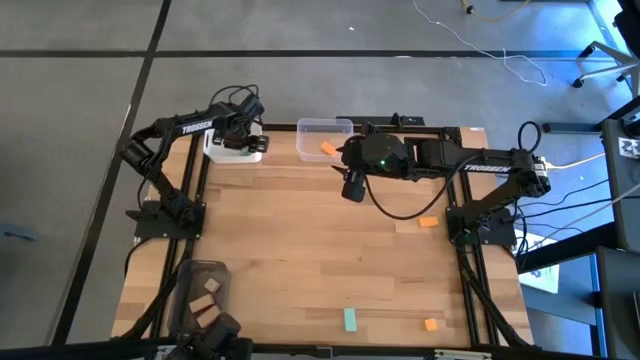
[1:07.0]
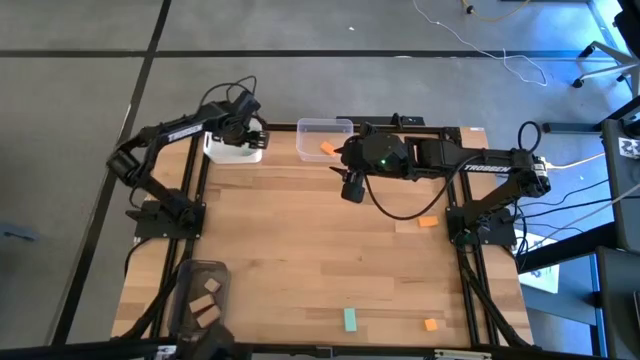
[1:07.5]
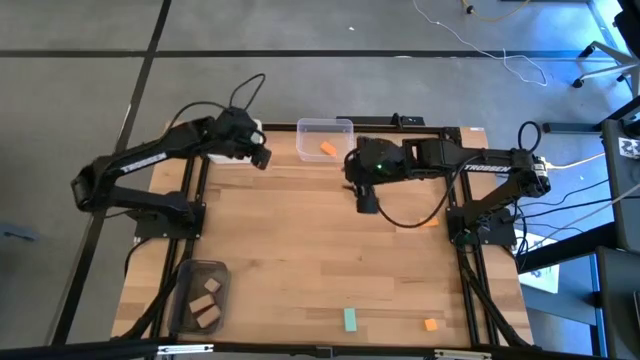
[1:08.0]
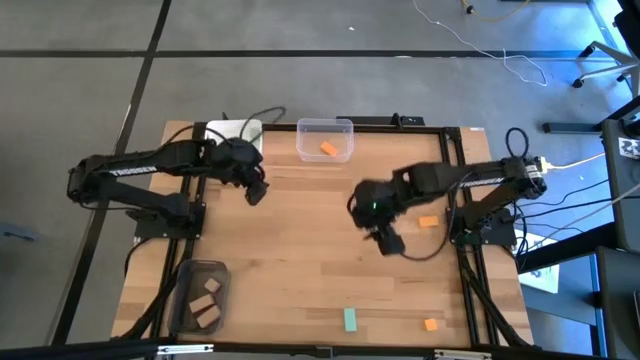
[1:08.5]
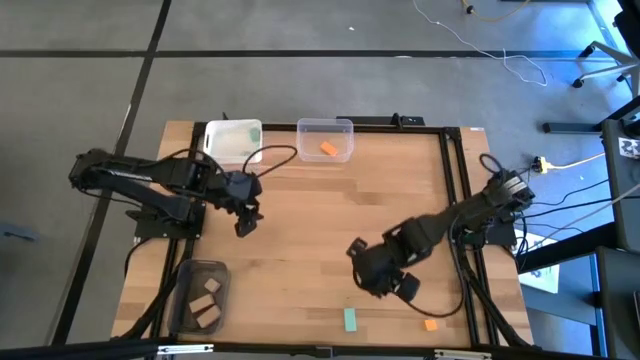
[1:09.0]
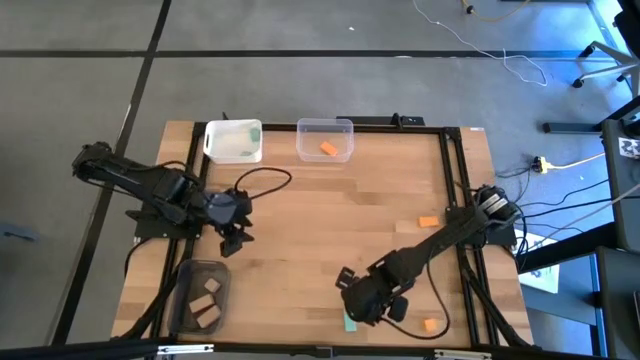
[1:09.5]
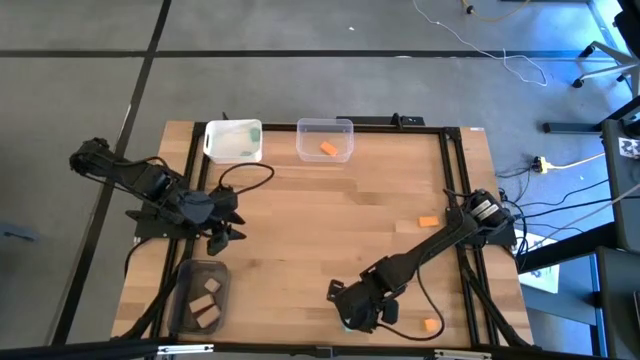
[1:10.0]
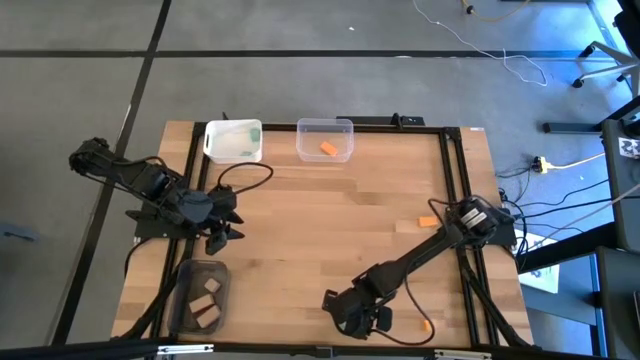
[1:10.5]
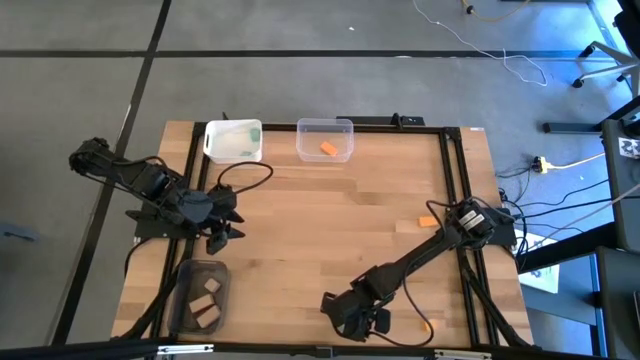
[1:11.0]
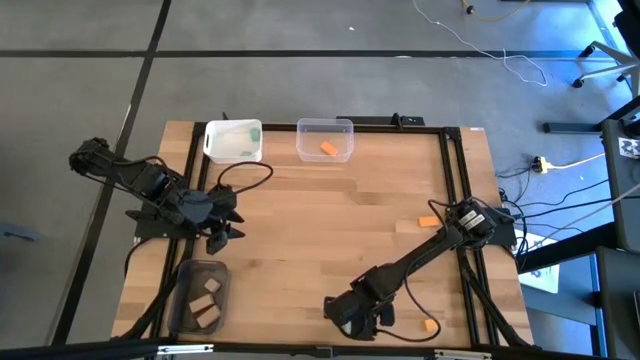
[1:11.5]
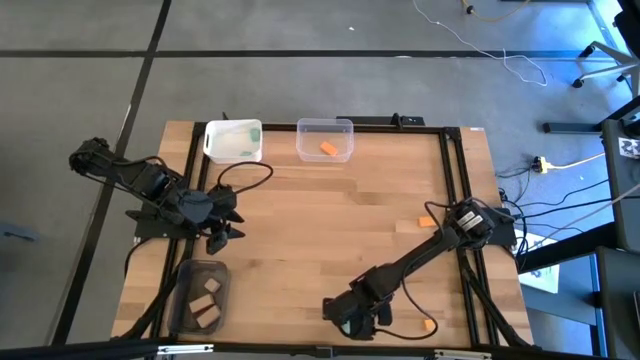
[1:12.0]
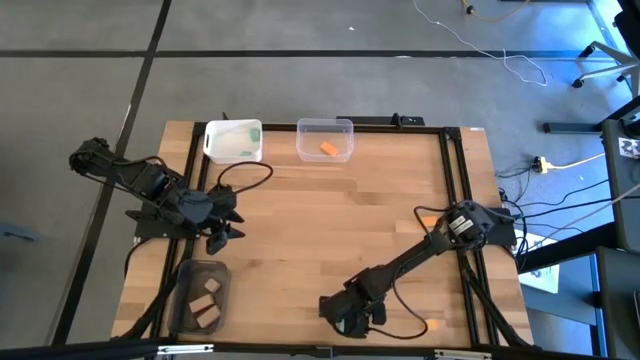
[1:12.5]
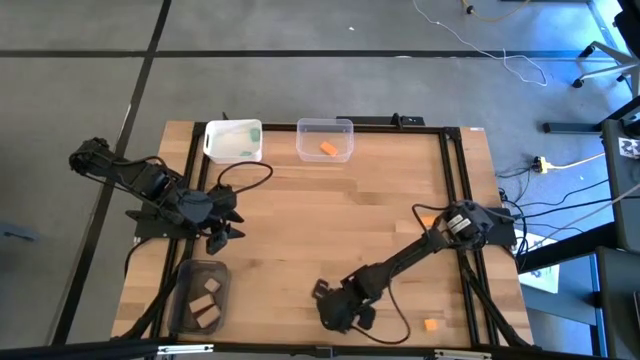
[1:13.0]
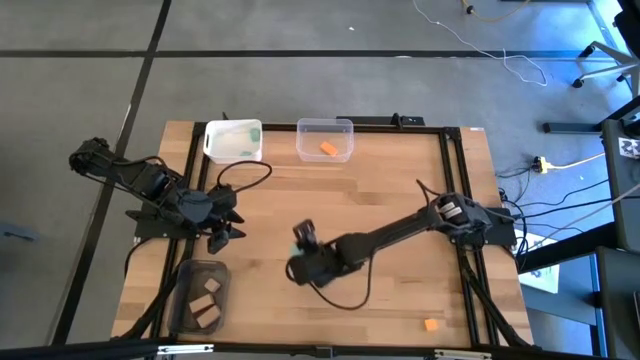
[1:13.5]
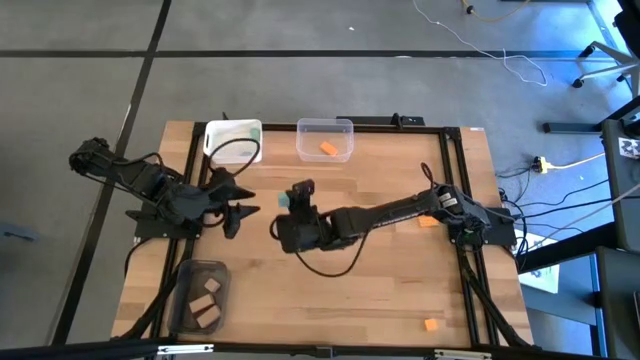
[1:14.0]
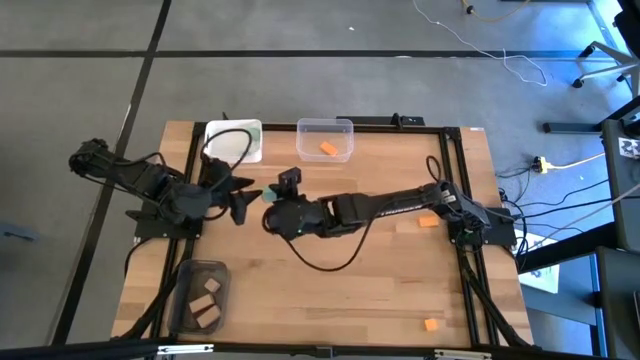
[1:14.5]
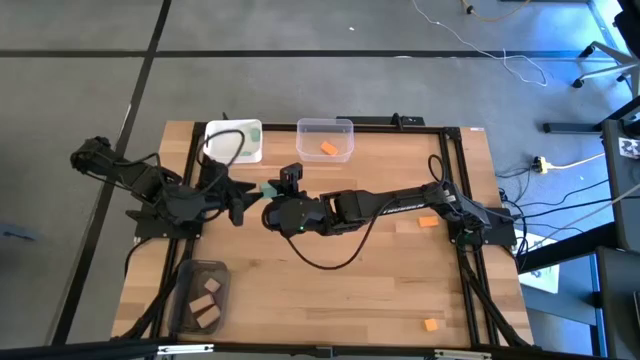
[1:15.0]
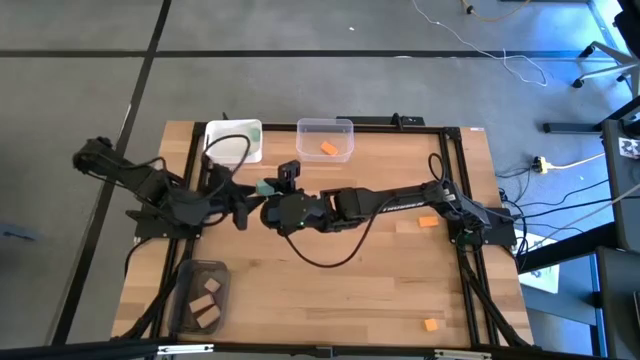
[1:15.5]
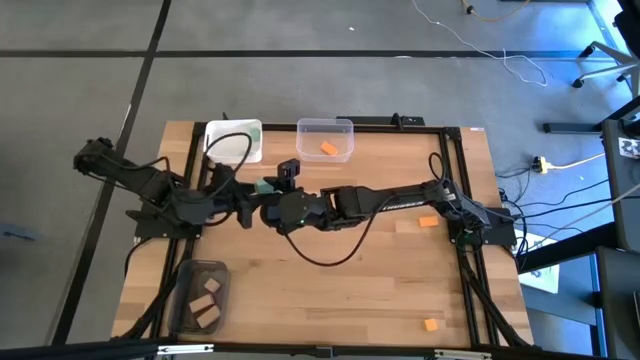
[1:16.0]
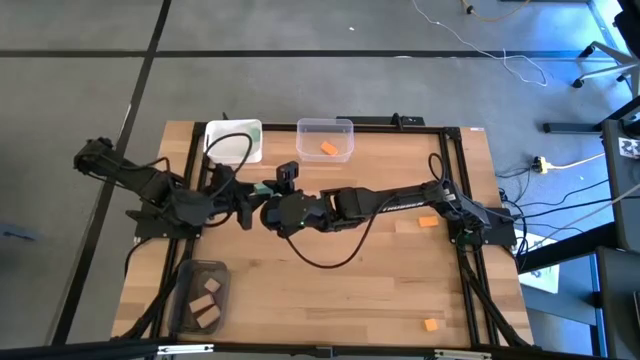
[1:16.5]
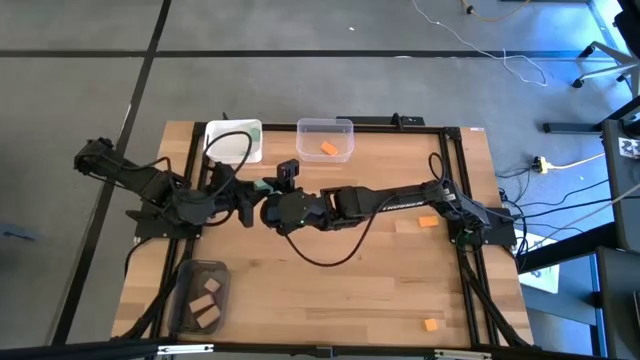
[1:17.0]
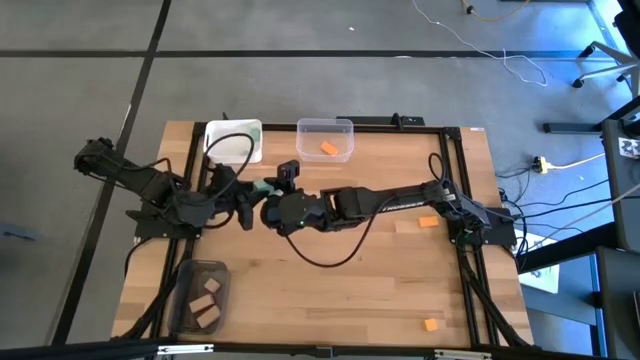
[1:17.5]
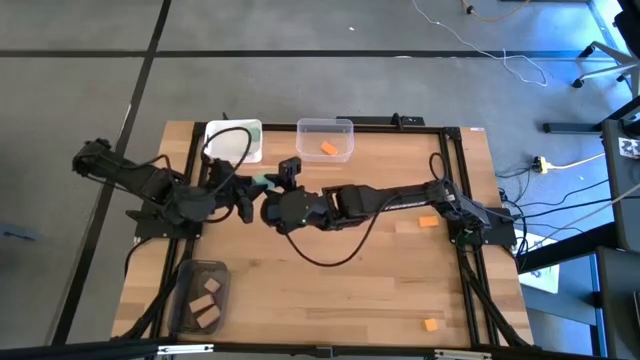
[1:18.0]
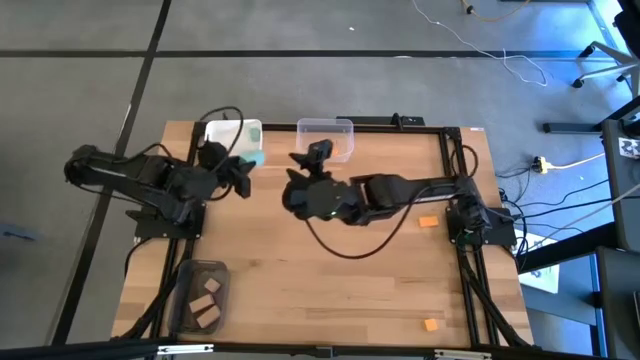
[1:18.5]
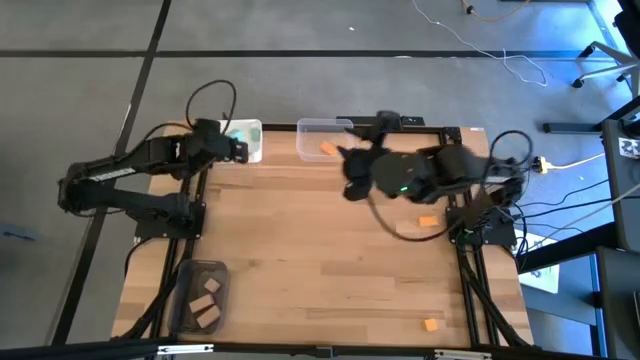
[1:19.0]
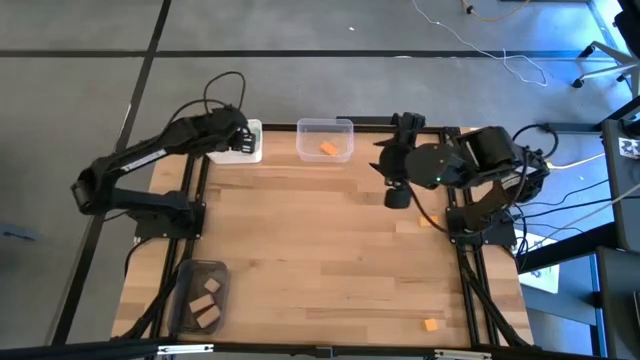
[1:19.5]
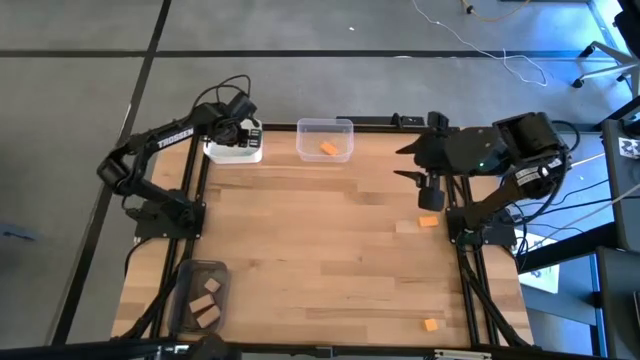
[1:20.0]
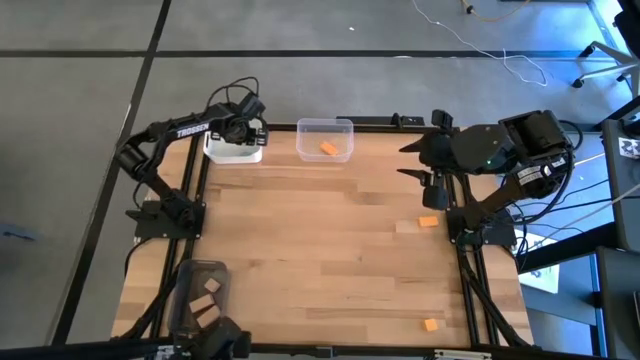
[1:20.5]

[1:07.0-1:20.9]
Task: Sort & place blocks by color
Put the blue block into the white bin

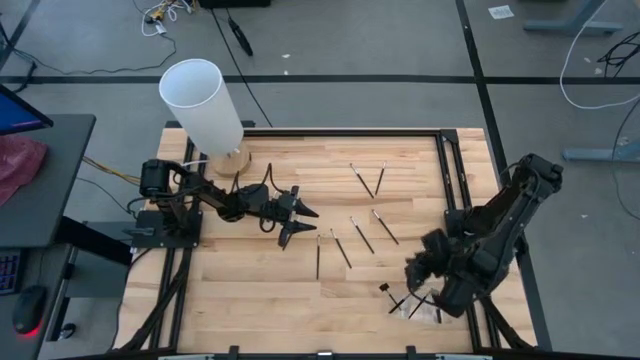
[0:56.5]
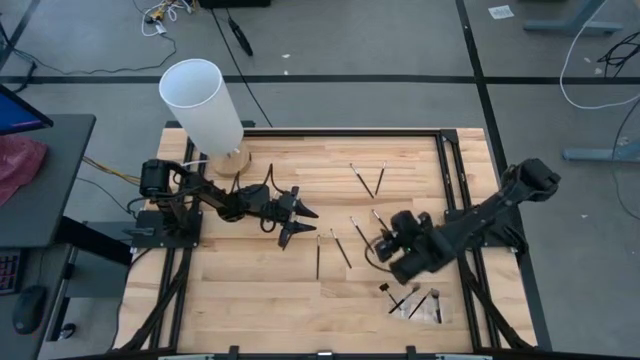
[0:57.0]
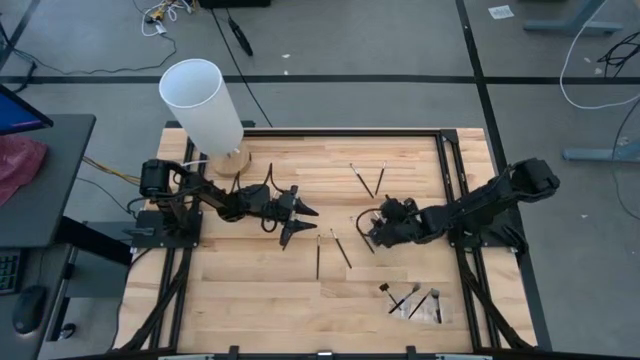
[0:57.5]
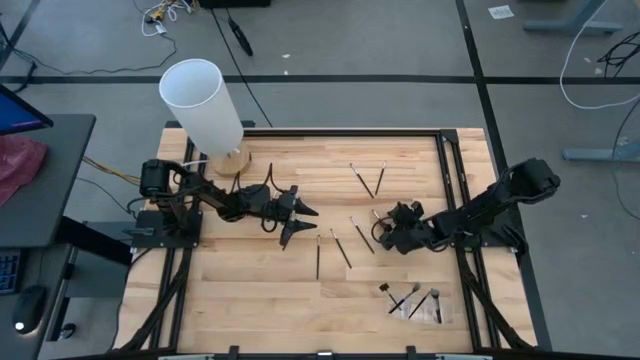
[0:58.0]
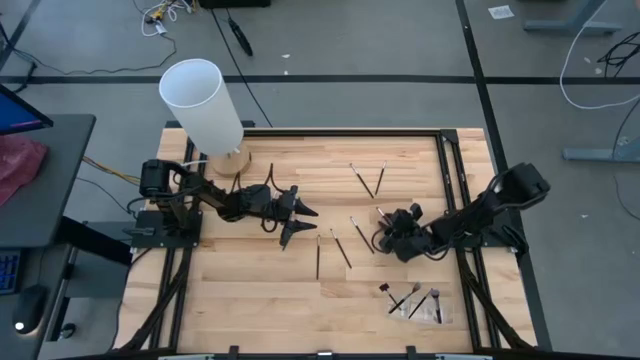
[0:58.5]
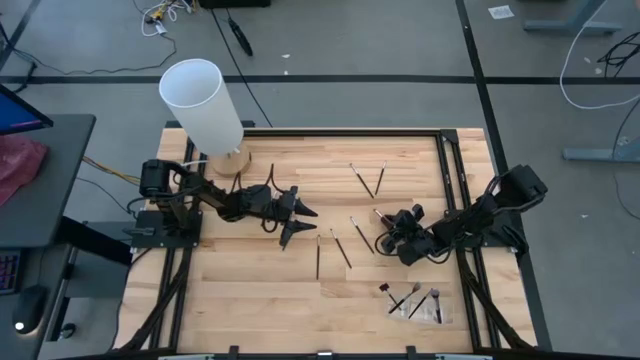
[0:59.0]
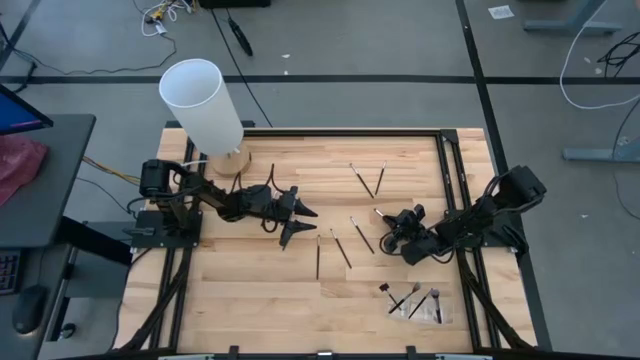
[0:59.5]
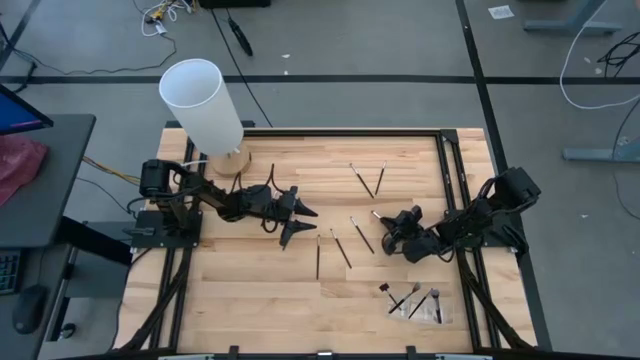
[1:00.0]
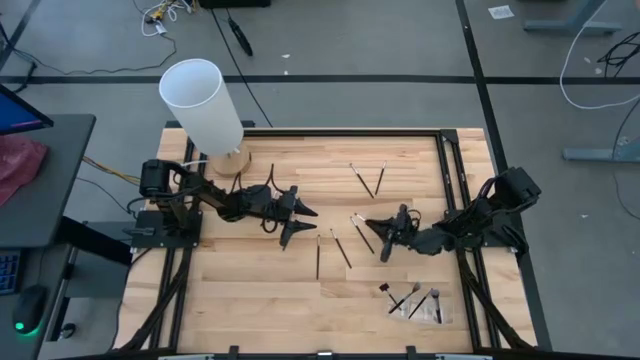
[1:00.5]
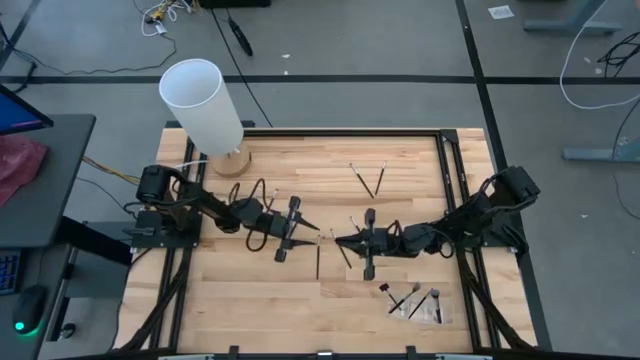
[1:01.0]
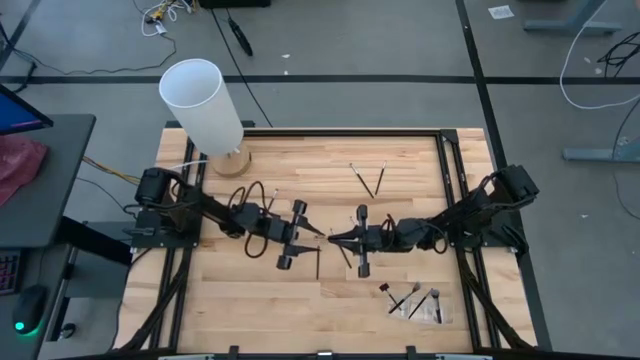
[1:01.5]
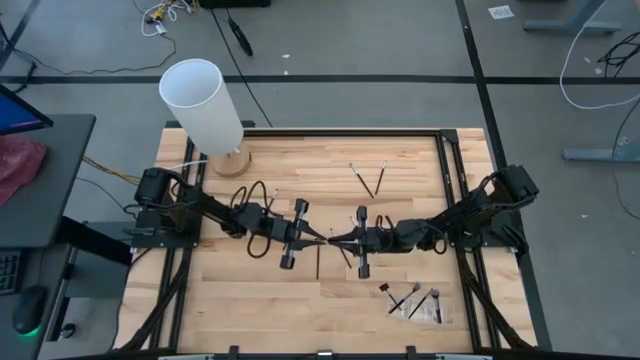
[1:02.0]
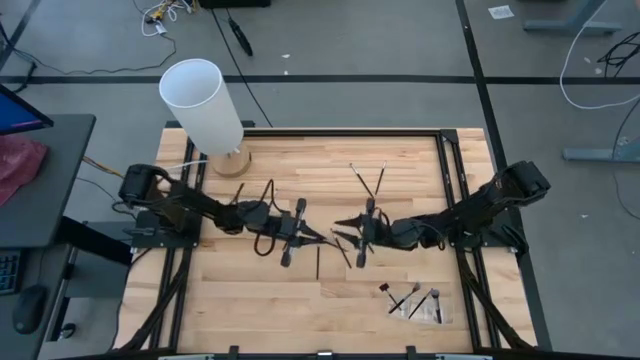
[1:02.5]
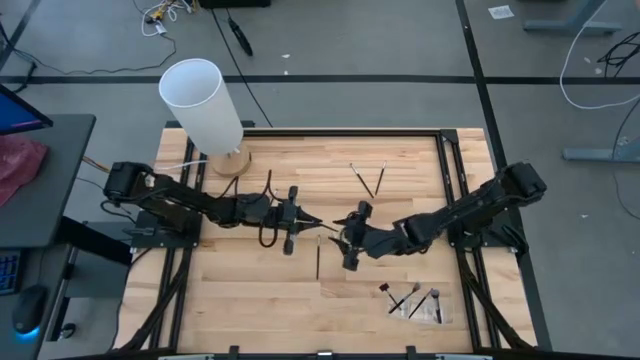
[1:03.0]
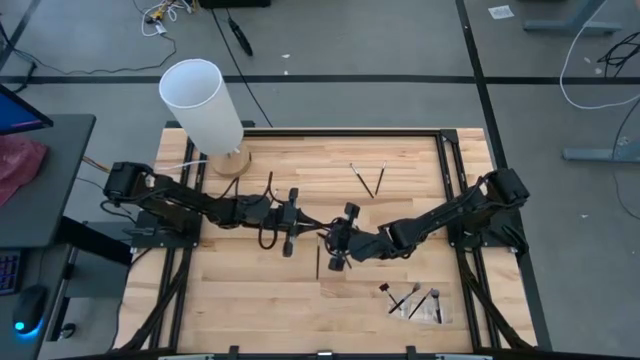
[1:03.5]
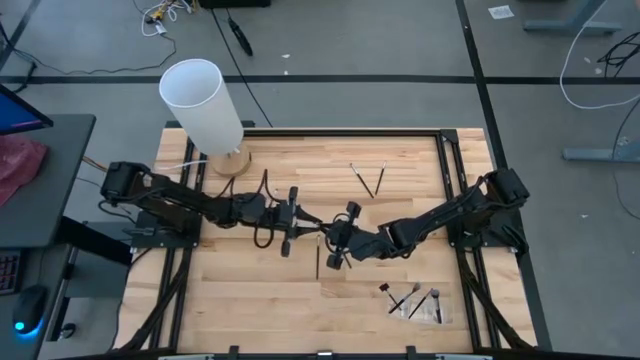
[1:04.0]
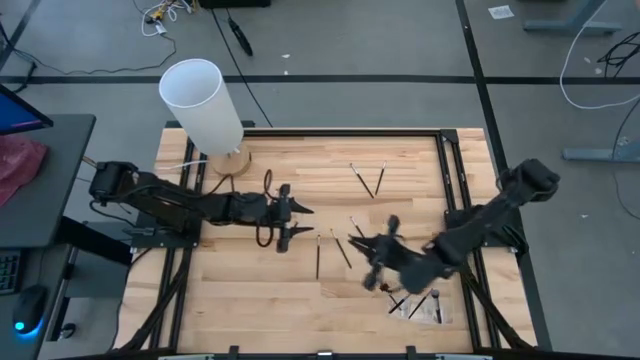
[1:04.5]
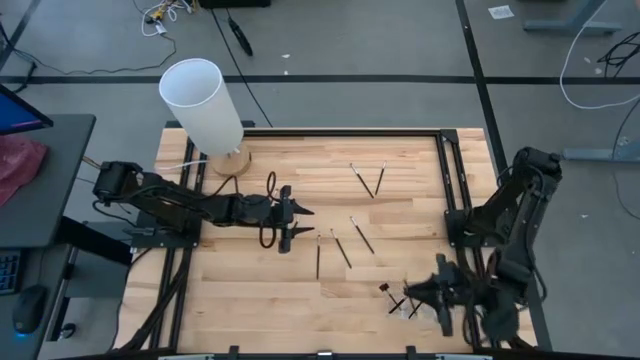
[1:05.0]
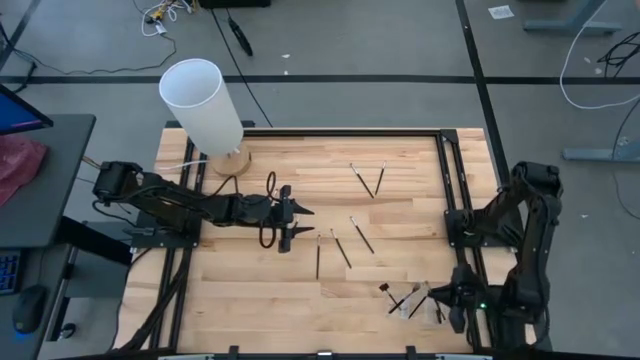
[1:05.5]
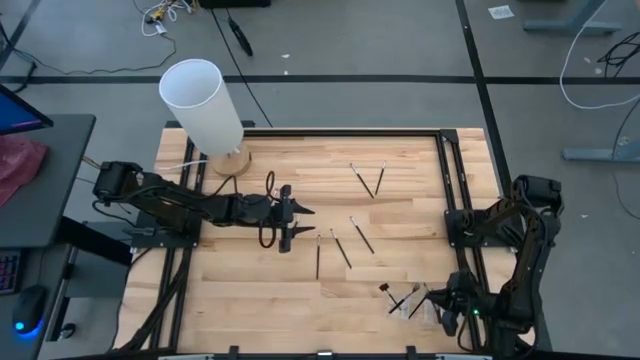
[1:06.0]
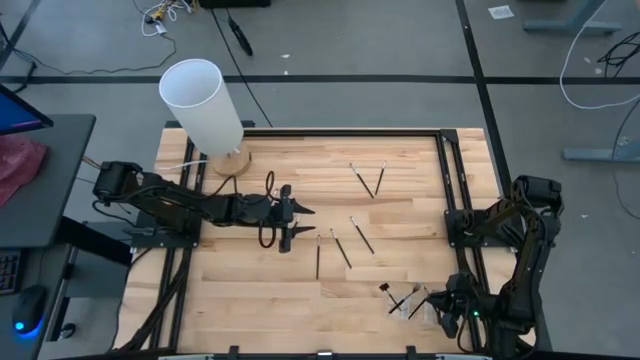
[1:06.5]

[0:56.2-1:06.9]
Task: Pick & Place Makeup Supplies
Put the silver makeup brush into the transparent organizer
